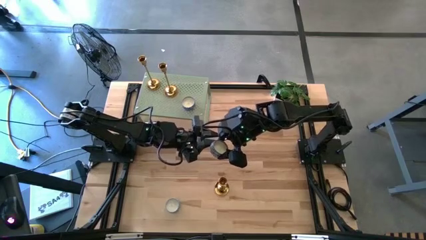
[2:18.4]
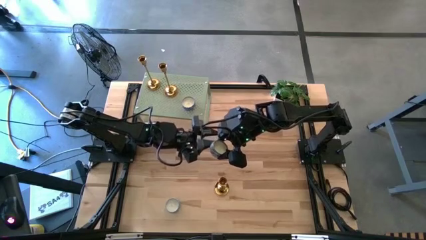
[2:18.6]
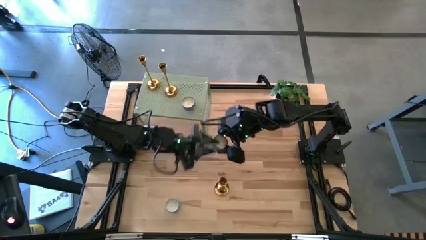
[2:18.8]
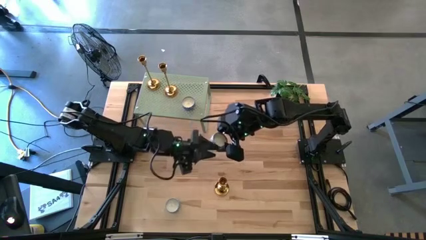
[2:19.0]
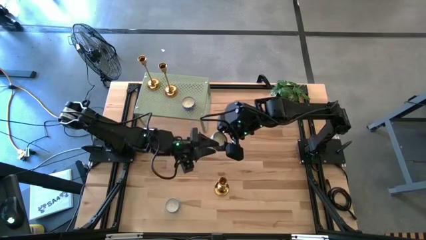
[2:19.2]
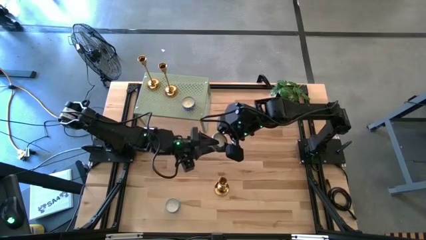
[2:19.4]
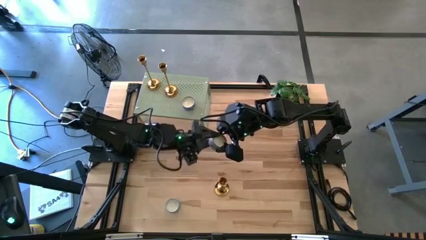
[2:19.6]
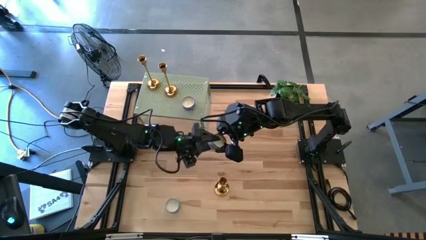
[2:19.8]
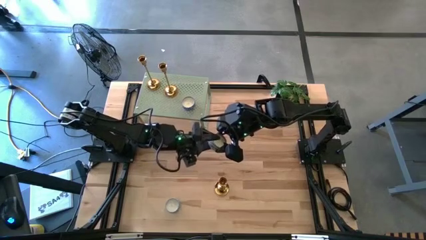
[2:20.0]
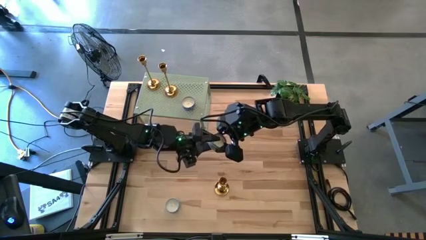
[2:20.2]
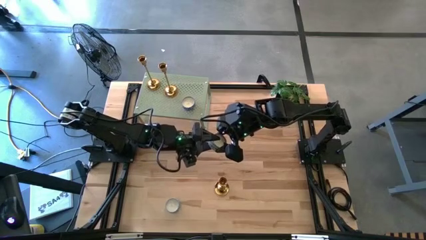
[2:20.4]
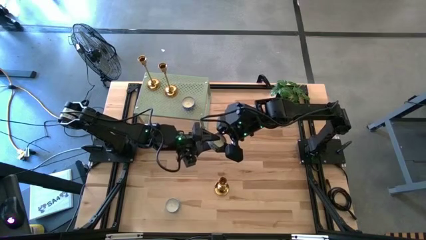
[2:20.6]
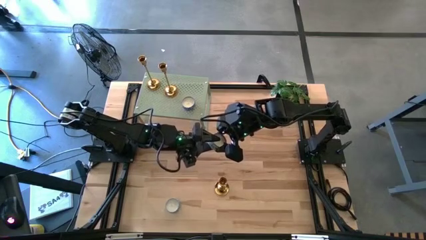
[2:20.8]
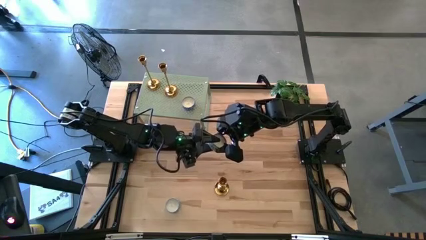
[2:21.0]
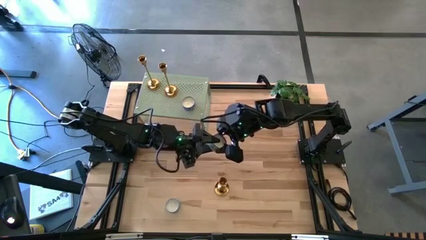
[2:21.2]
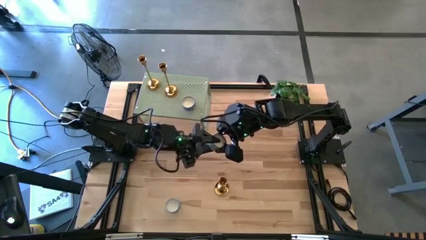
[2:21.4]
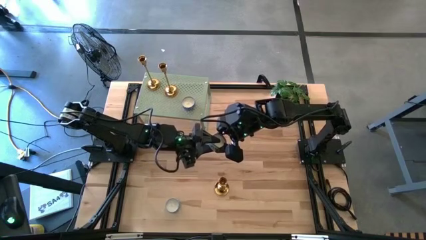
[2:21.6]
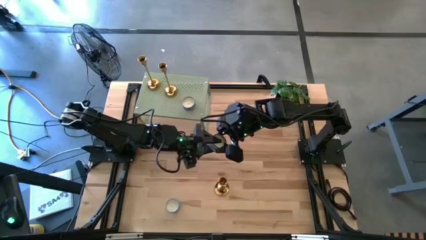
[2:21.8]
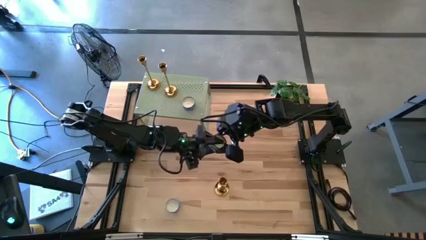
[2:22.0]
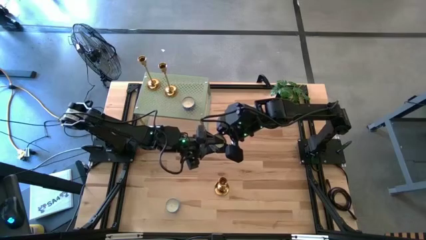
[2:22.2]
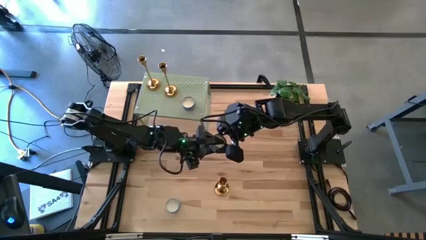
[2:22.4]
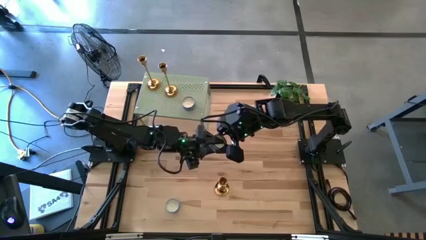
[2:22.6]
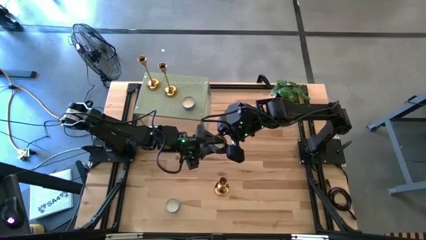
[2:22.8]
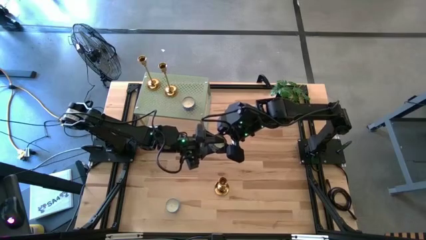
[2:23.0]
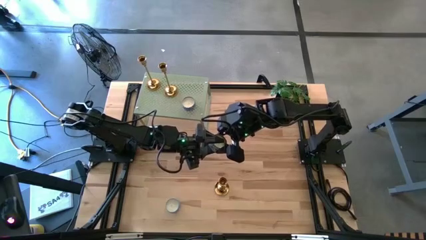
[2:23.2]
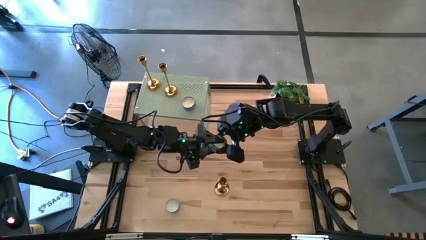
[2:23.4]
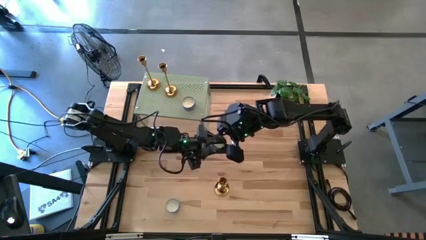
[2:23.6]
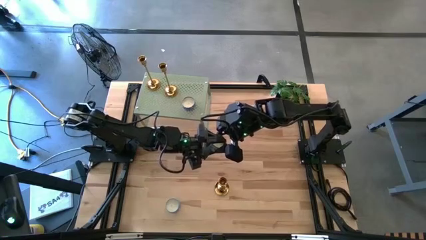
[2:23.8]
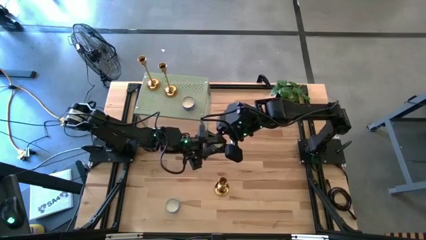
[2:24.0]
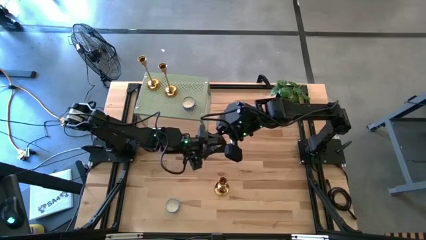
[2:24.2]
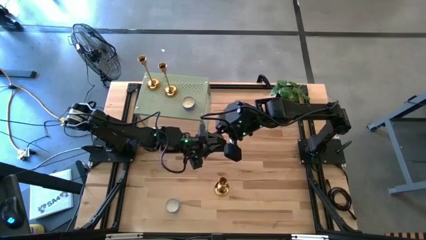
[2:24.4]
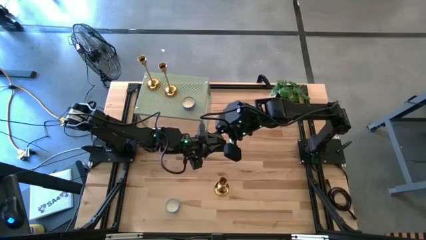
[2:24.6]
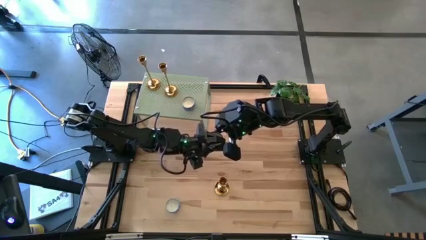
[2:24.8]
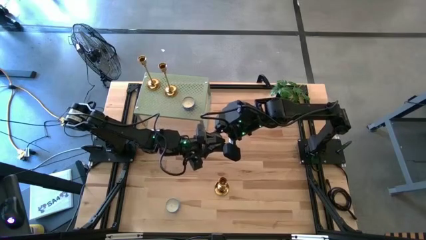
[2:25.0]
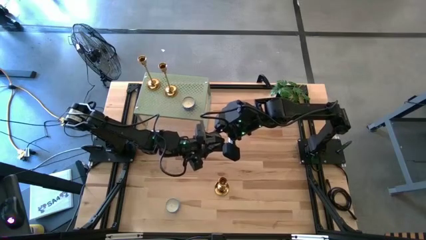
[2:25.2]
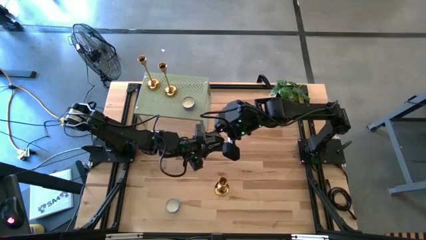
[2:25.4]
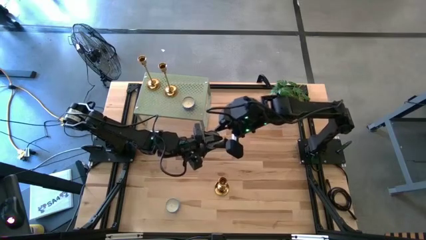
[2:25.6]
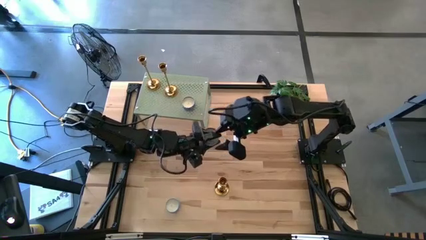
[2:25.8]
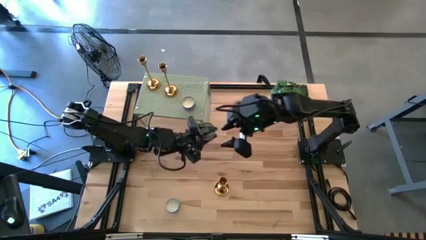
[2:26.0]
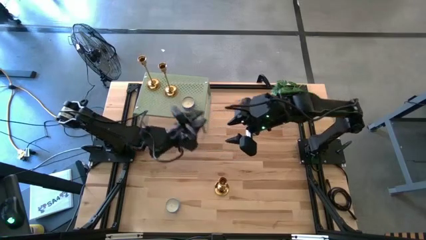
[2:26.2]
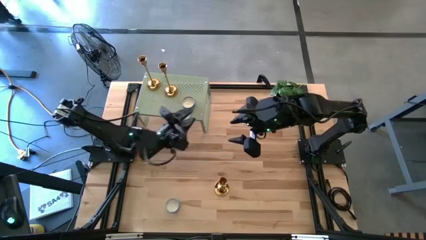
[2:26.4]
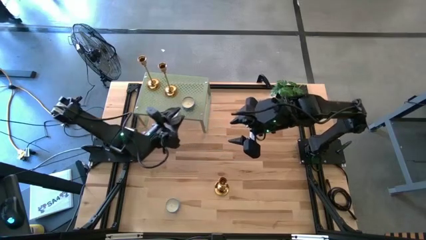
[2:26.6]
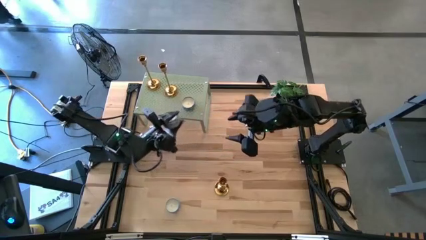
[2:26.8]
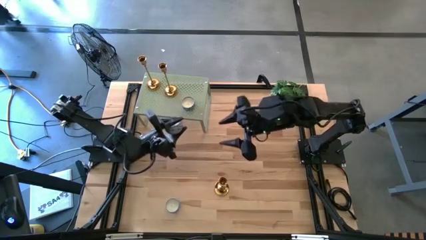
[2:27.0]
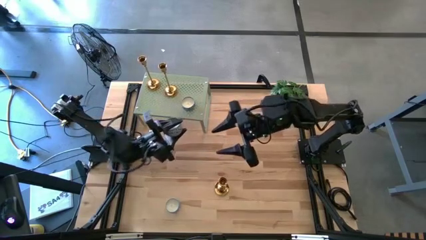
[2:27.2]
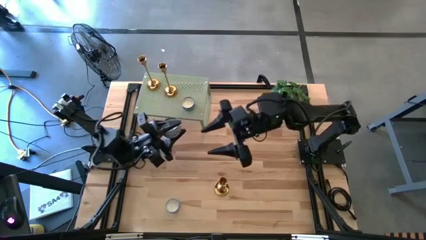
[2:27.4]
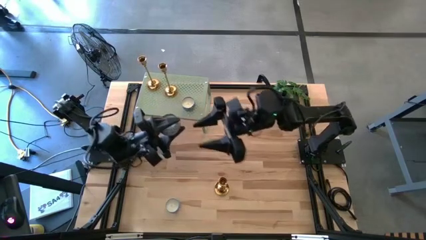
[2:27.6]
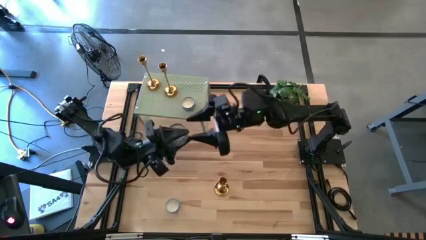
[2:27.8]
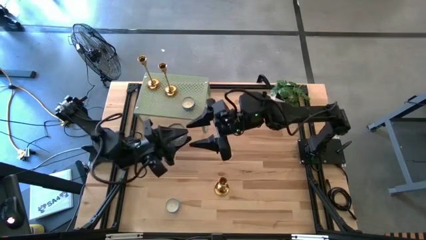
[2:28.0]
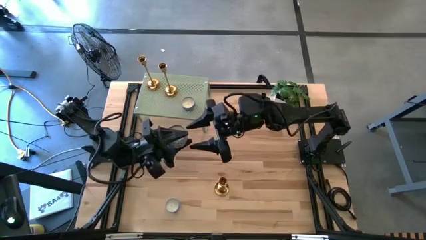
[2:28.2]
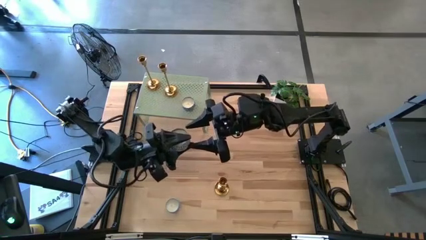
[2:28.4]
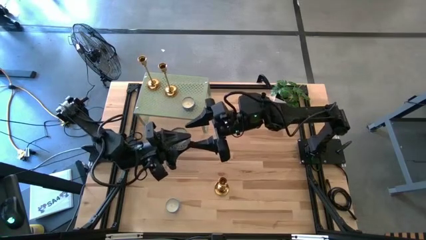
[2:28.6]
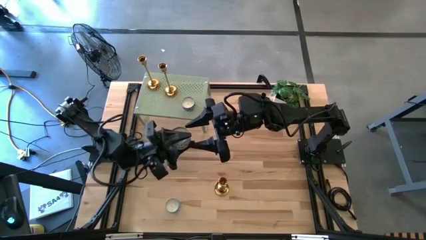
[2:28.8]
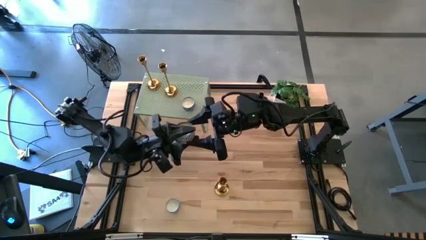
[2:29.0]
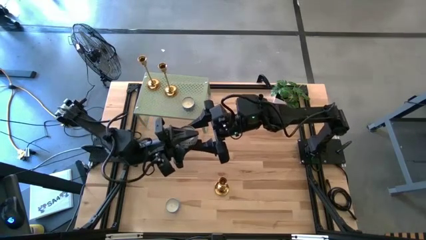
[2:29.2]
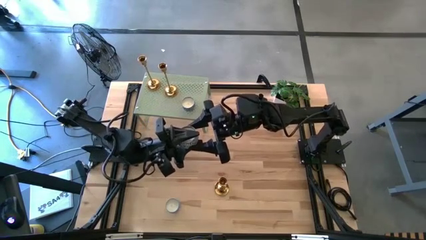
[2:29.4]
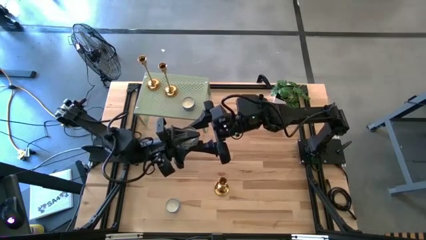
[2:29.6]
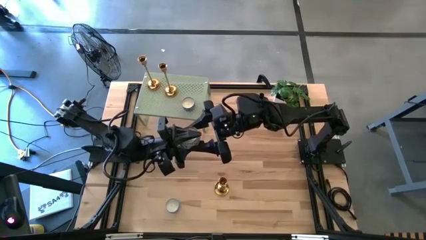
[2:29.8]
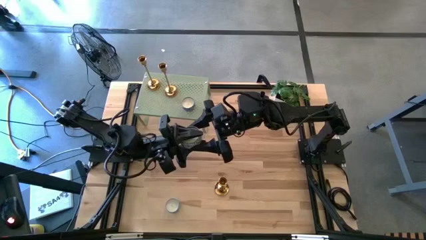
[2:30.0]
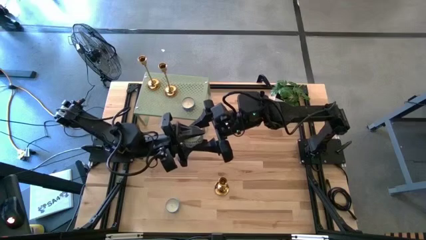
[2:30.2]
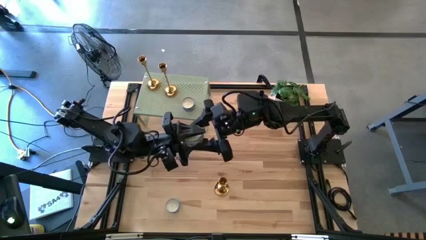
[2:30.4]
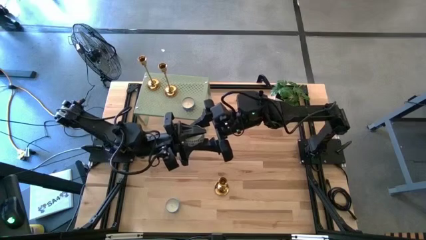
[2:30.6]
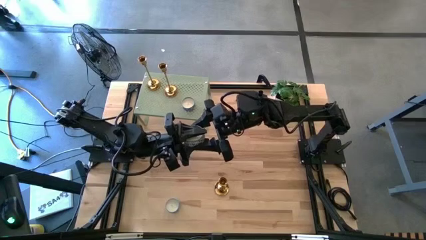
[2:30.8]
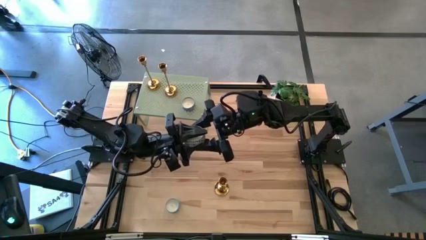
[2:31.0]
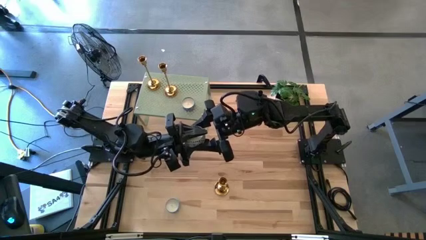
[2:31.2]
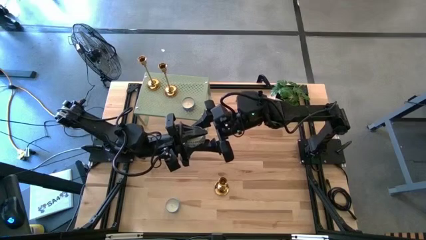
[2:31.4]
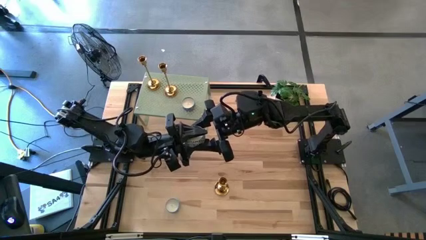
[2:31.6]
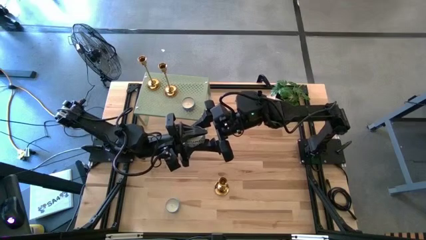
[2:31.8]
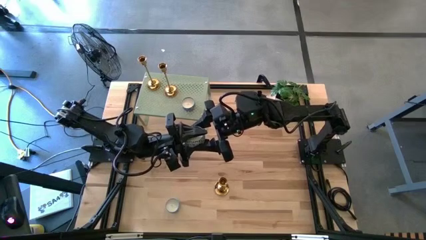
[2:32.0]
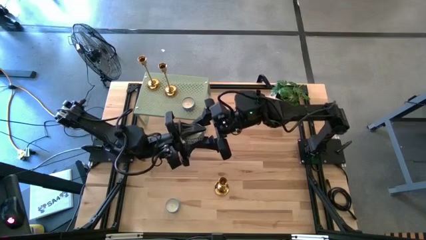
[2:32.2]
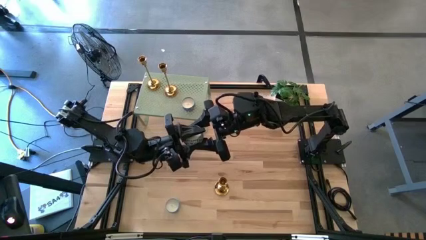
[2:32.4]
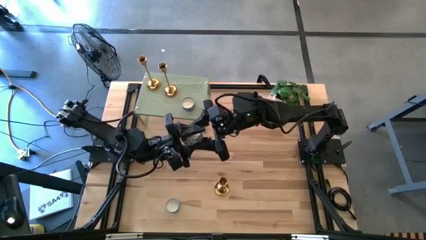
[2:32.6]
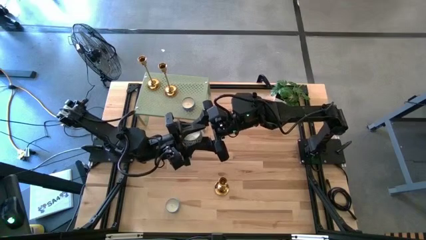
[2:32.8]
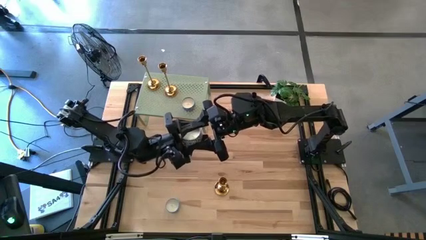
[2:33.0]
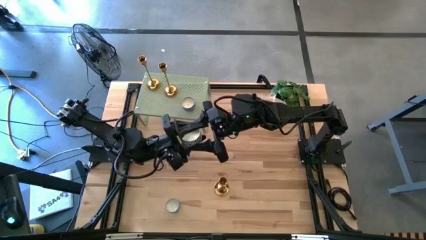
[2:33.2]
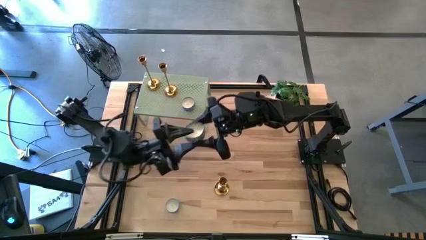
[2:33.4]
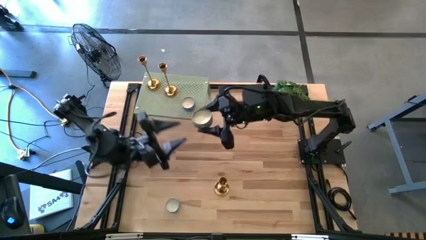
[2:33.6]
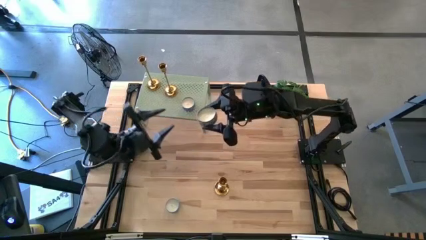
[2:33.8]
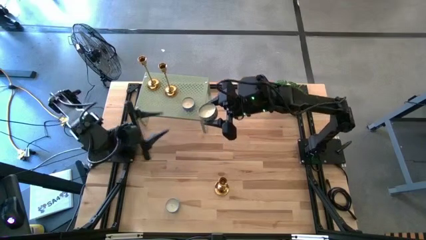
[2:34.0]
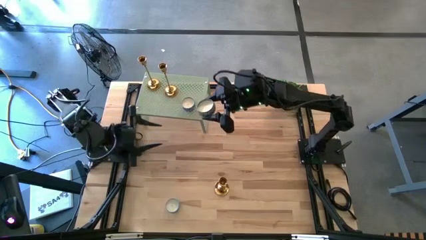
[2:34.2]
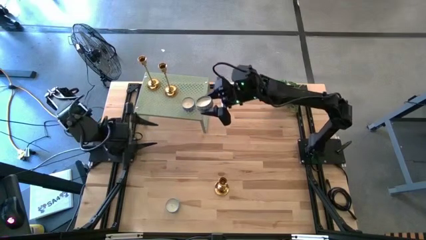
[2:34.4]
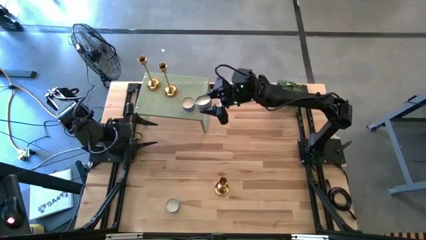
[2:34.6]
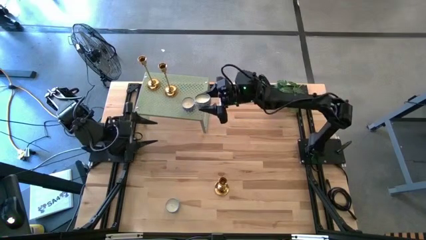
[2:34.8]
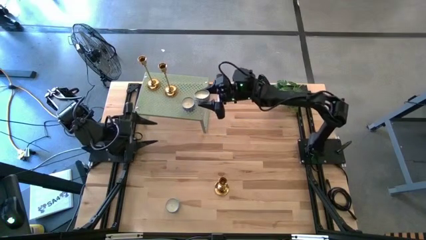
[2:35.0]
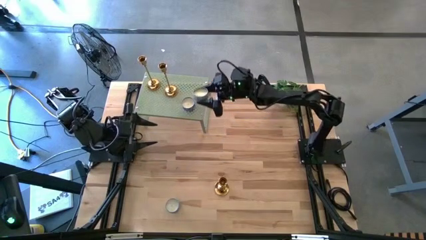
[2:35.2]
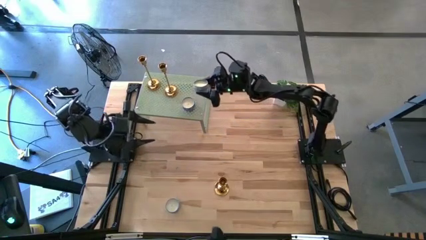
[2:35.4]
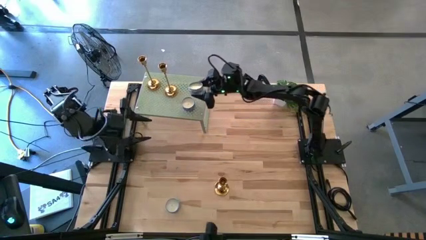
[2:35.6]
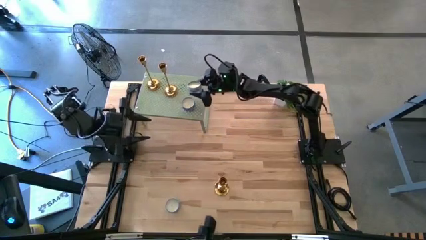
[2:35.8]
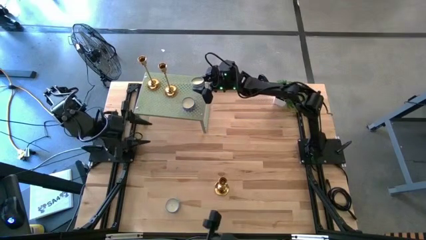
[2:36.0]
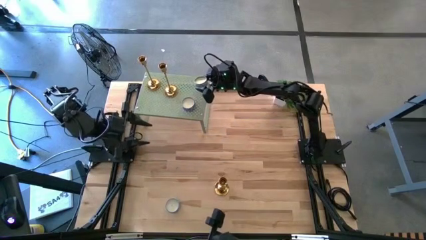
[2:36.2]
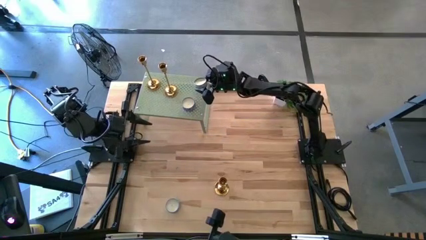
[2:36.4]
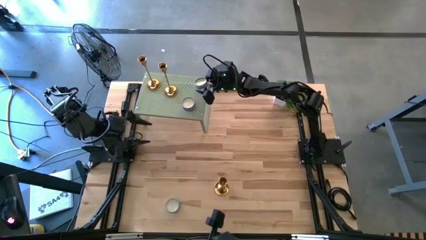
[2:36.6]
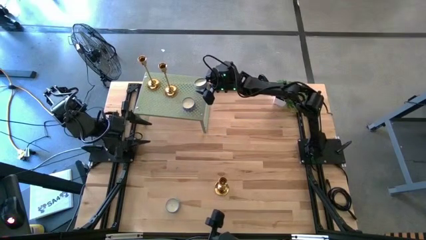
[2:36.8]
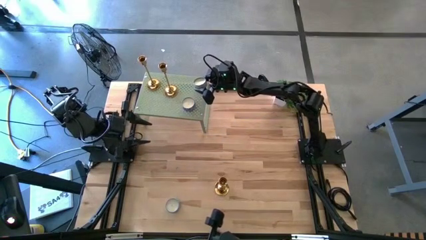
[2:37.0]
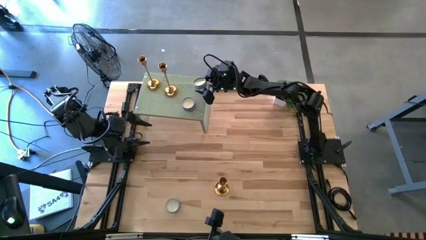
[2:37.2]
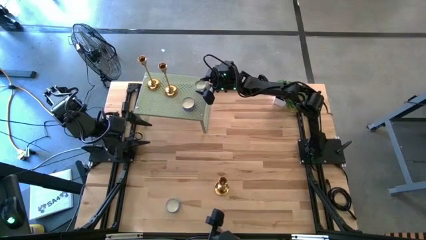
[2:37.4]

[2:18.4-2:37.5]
Task: Pick & Place candle stick holders
Put the right blue patterned round candle on the shelf
